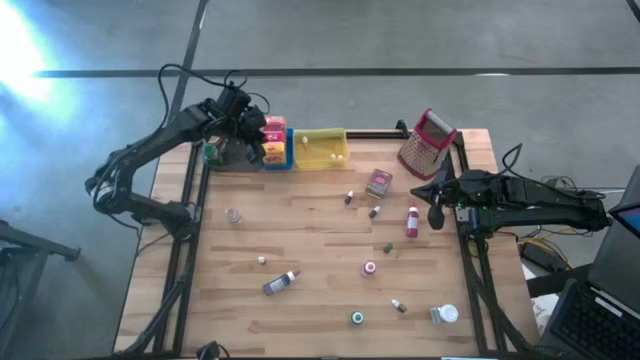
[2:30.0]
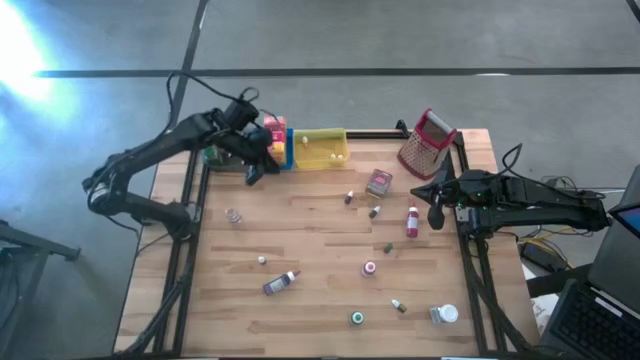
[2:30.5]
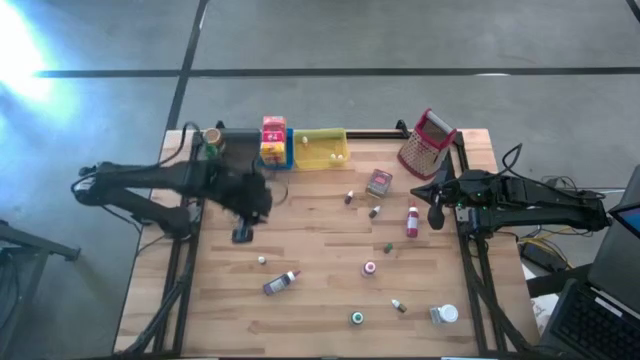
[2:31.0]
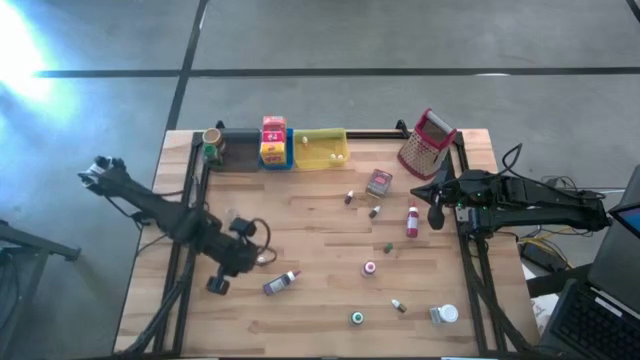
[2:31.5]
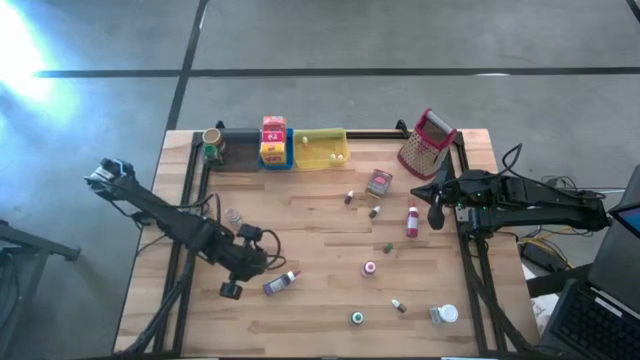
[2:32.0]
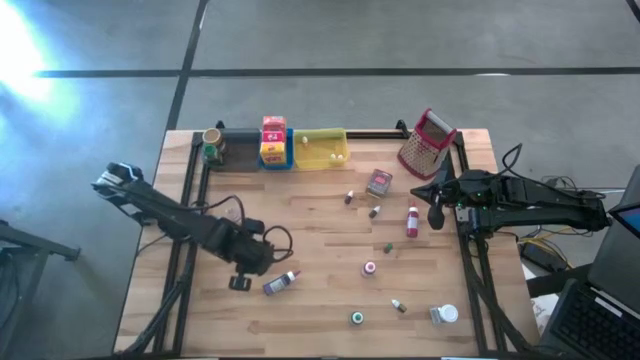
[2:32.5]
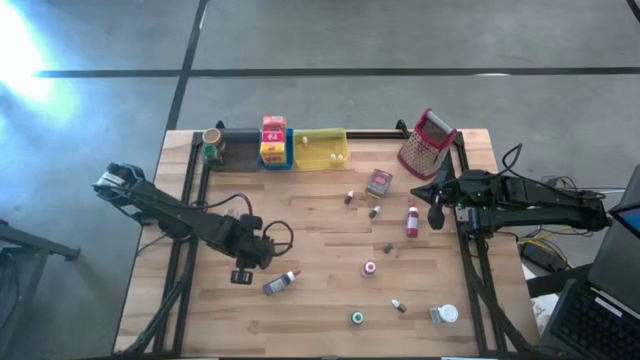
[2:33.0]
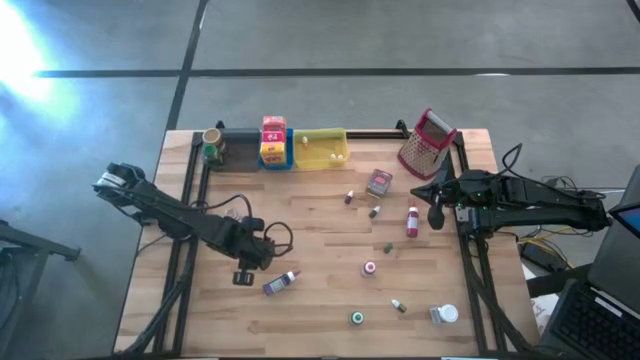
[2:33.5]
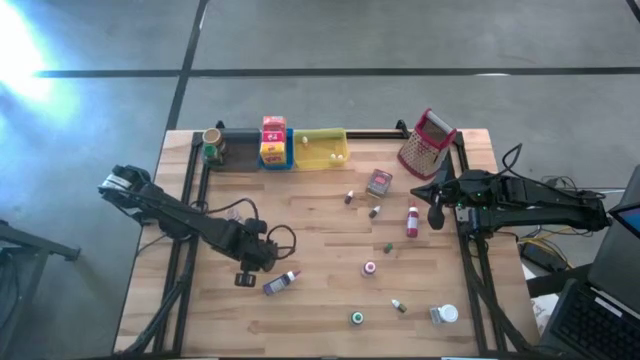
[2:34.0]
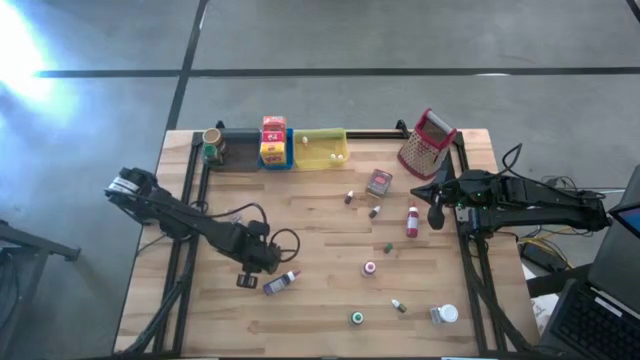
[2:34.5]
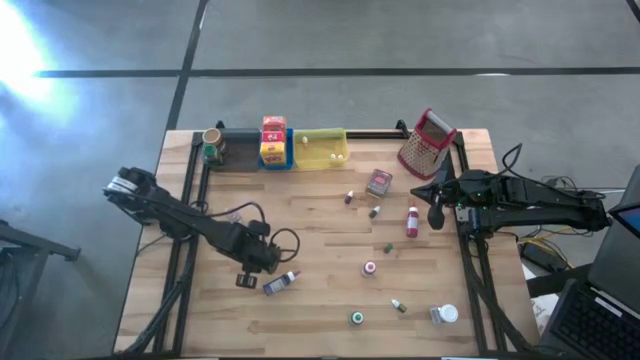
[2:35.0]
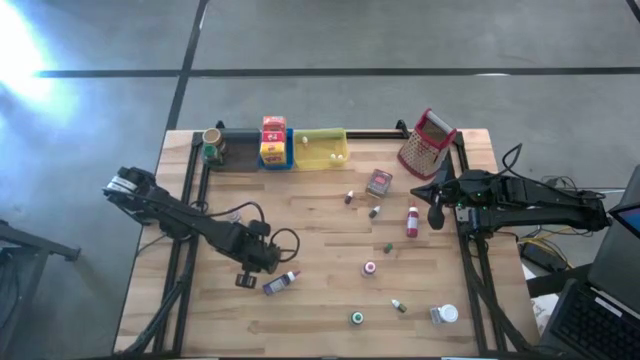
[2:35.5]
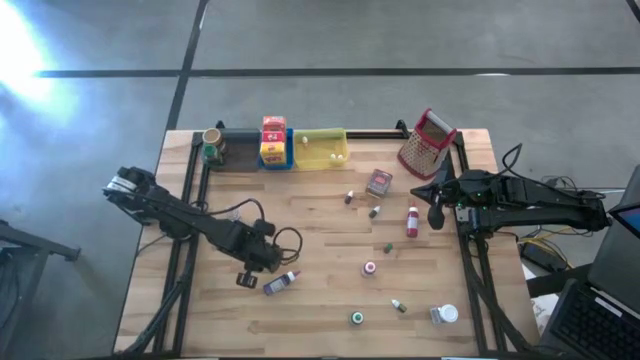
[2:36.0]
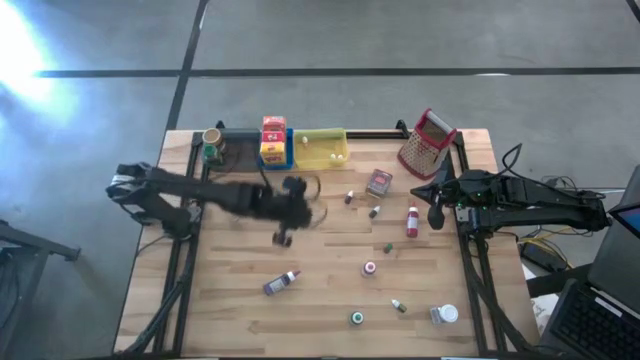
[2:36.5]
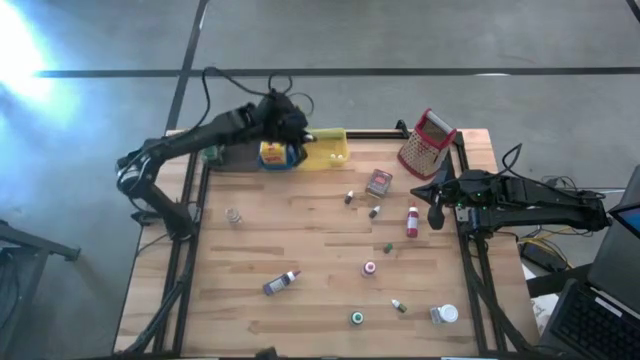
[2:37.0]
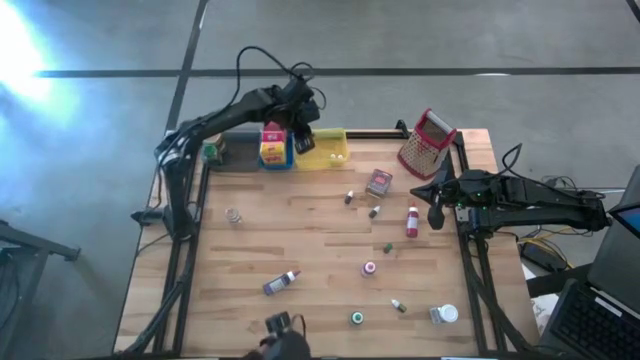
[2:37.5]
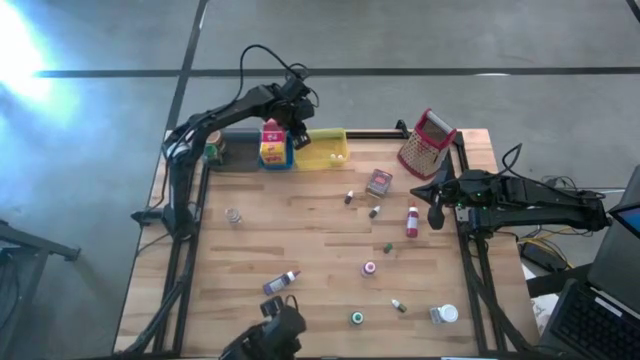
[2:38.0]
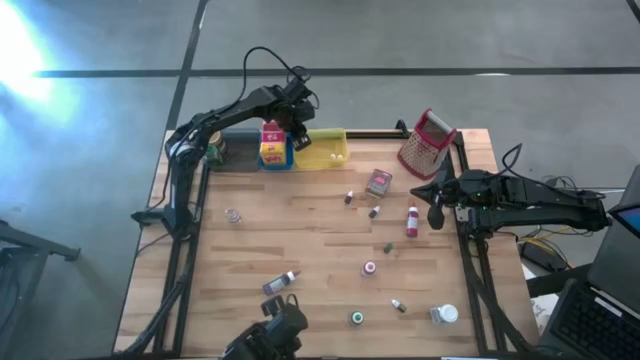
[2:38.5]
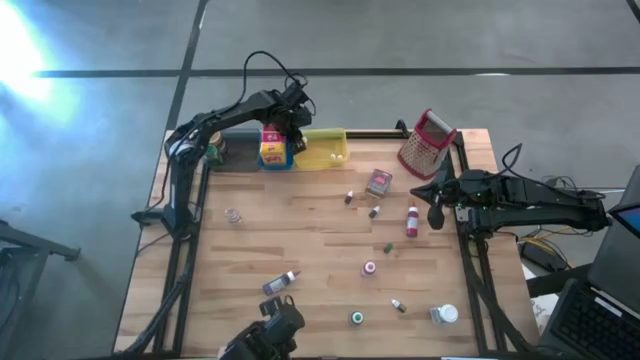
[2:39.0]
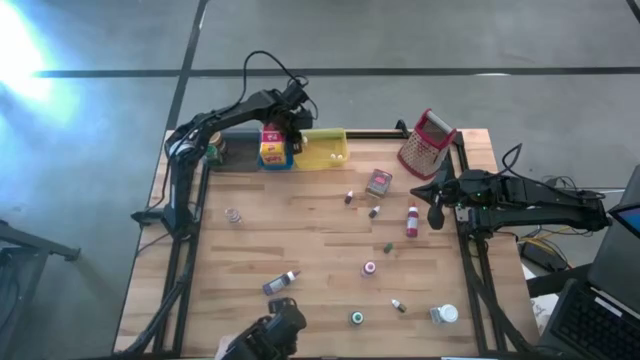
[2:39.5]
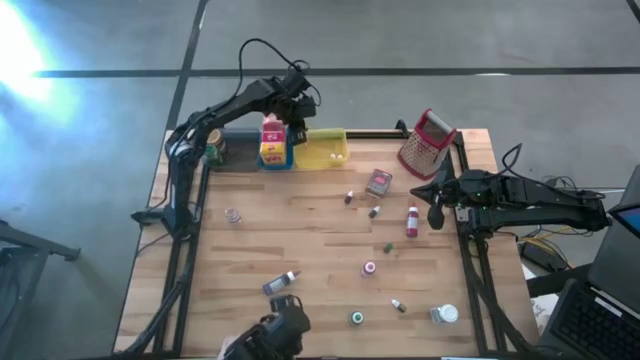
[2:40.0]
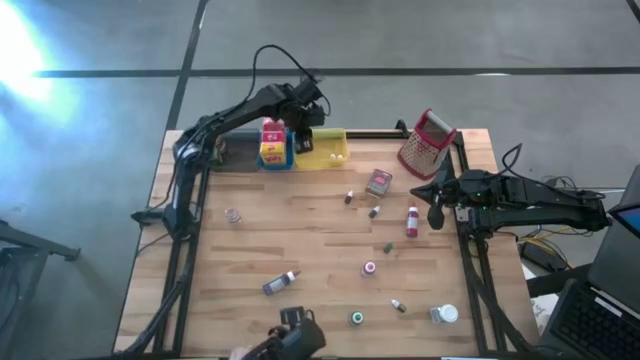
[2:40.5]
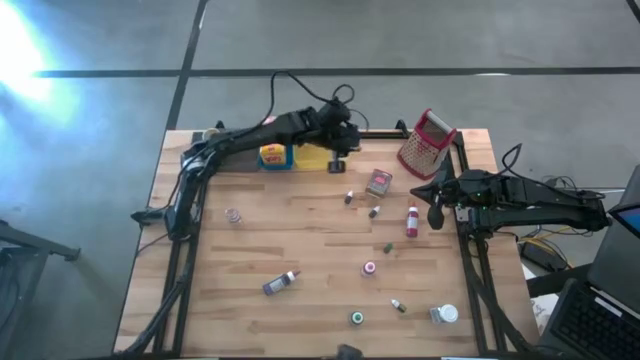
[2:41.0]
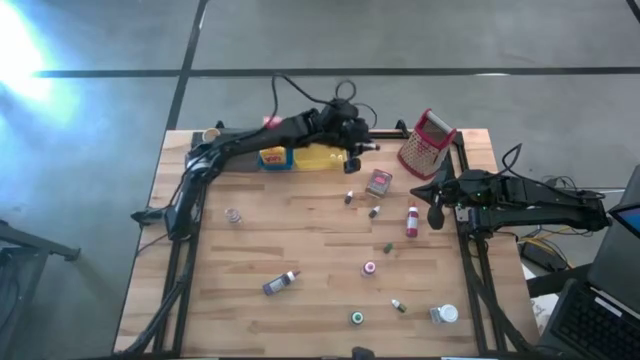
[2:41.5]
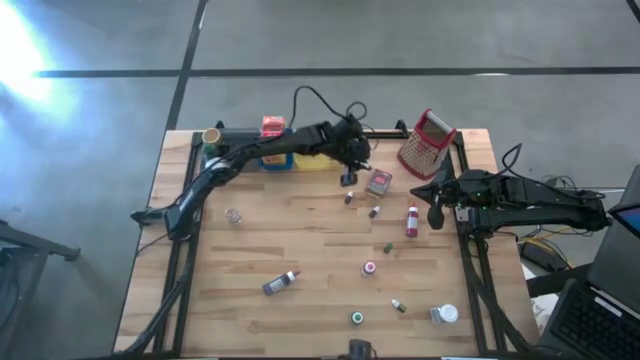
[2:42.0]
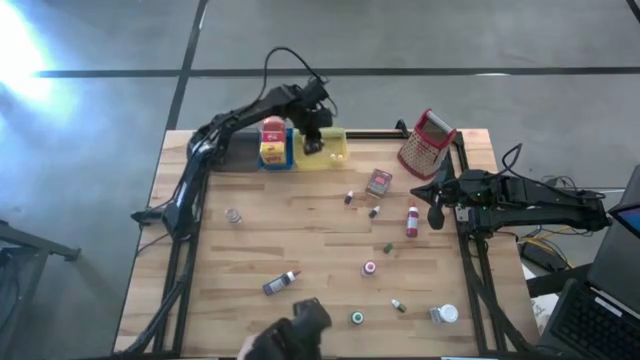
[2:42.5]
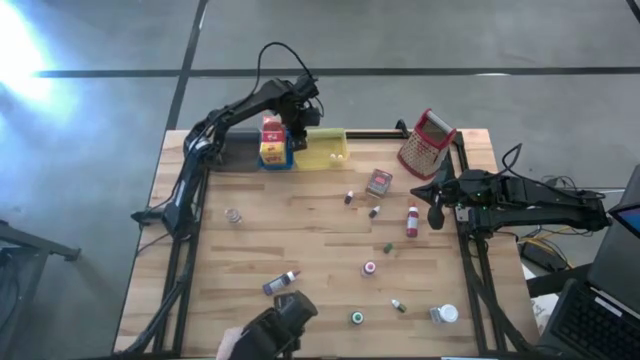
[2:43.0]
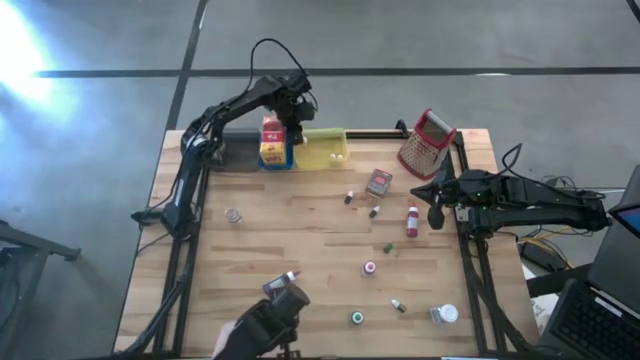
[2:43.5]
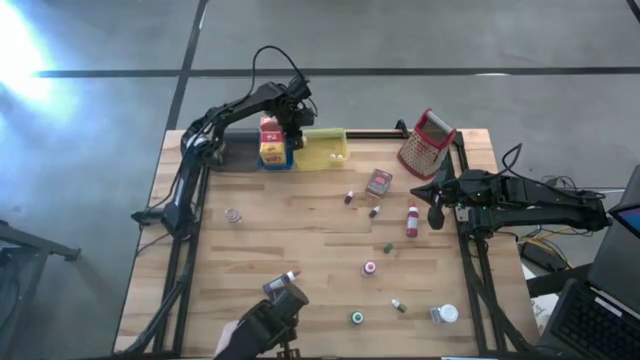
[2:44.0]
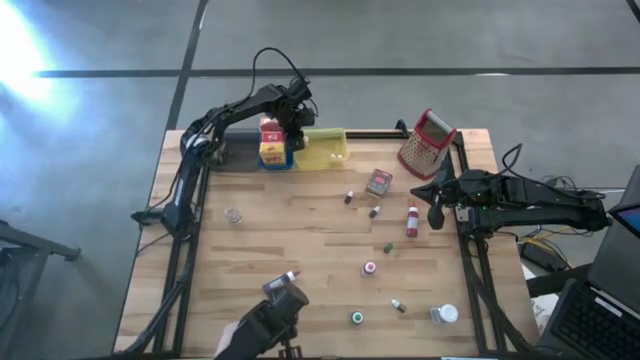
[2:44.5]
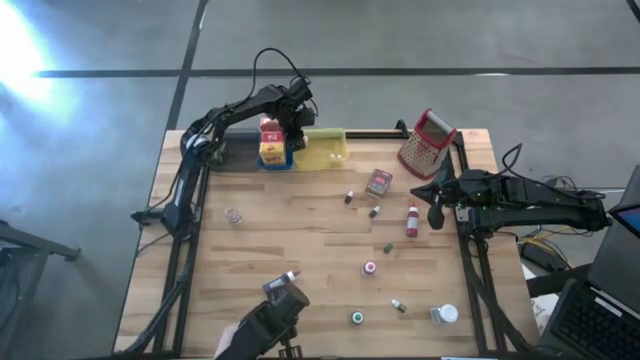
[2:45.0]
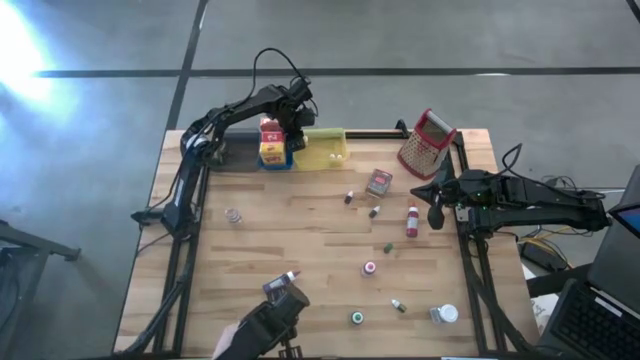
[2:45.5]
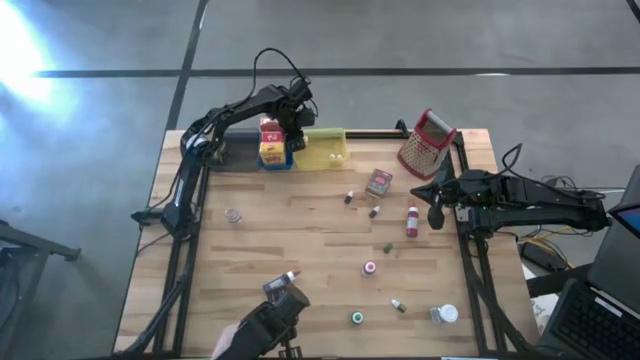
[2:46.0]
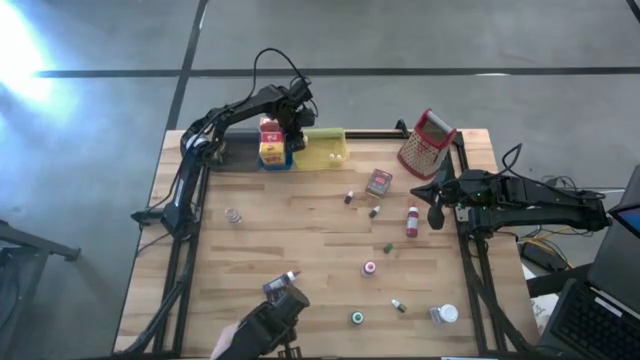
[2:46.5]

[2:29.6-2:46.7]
Task: Pick & Place Kitchen Items
Put the left small violet food coloring bottle into the yellow bin

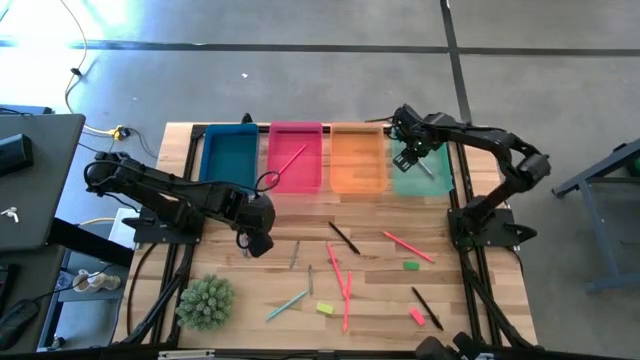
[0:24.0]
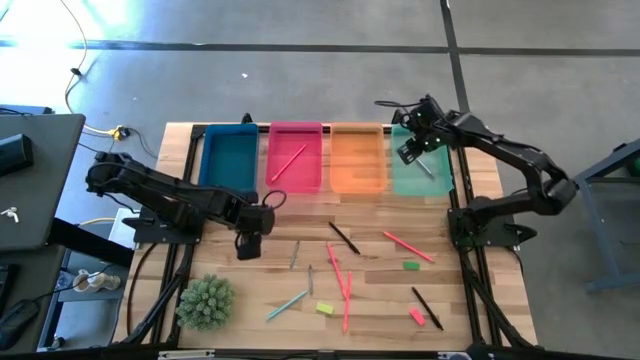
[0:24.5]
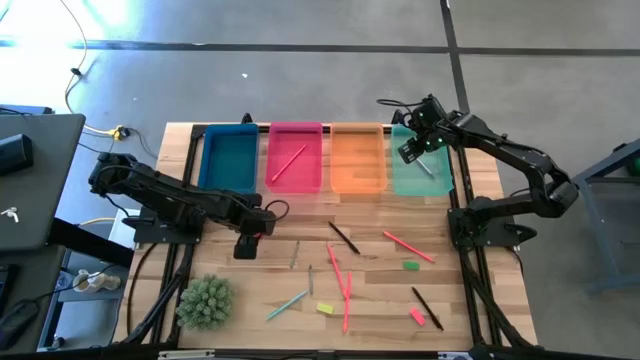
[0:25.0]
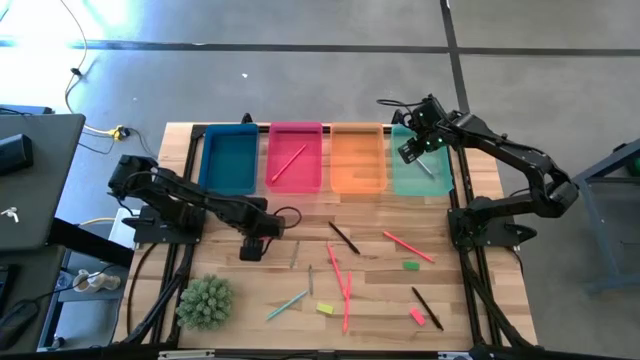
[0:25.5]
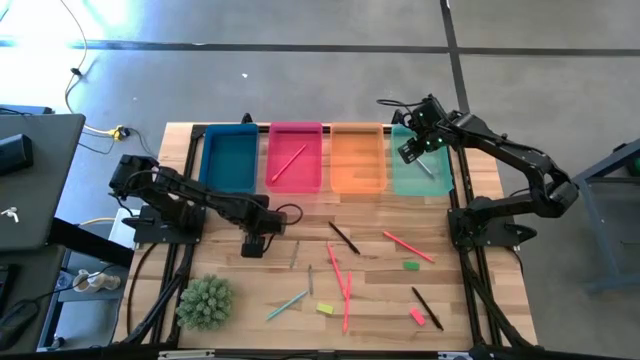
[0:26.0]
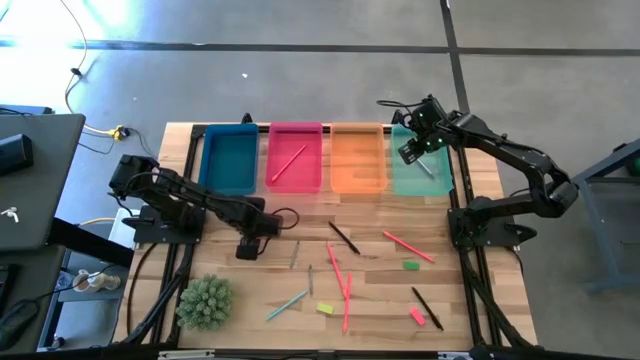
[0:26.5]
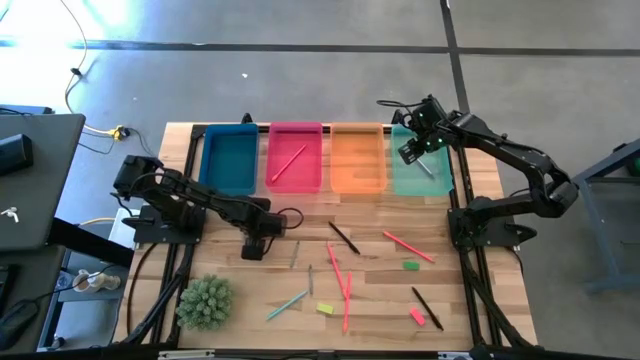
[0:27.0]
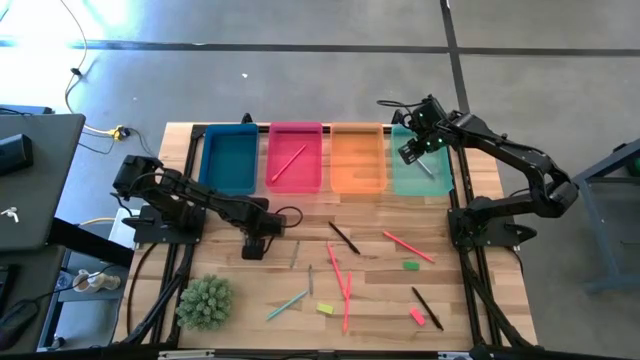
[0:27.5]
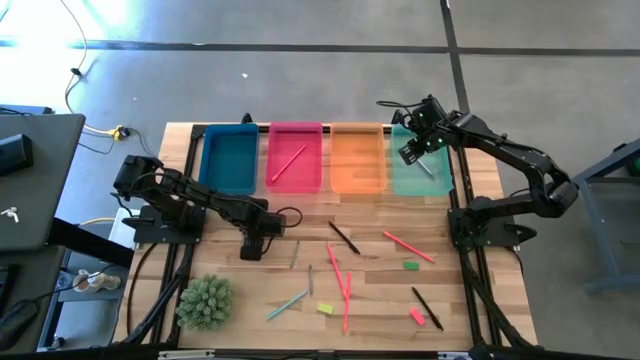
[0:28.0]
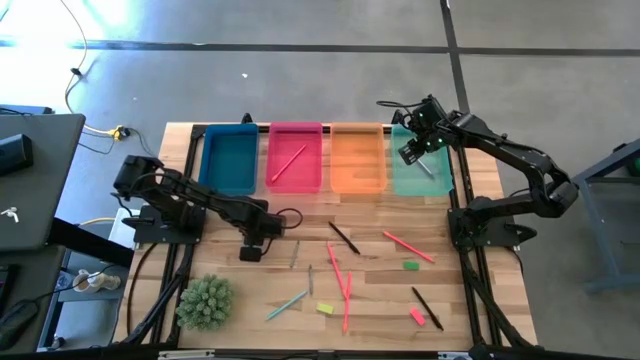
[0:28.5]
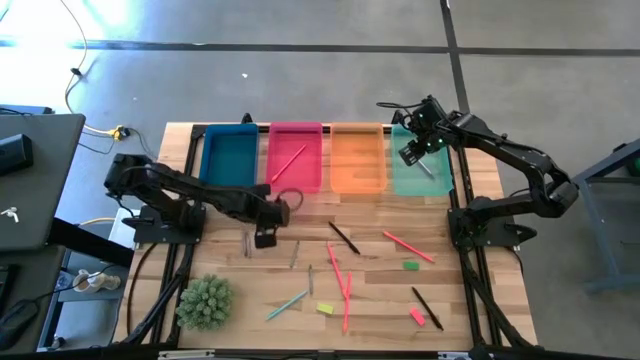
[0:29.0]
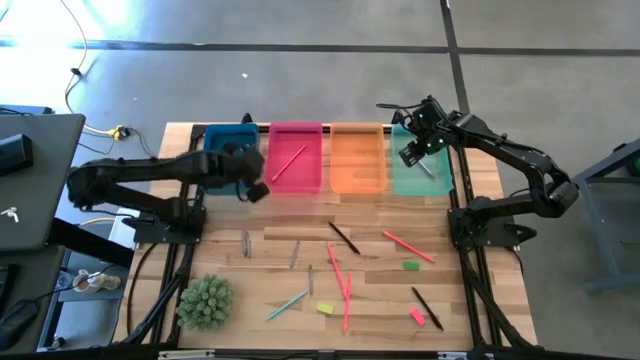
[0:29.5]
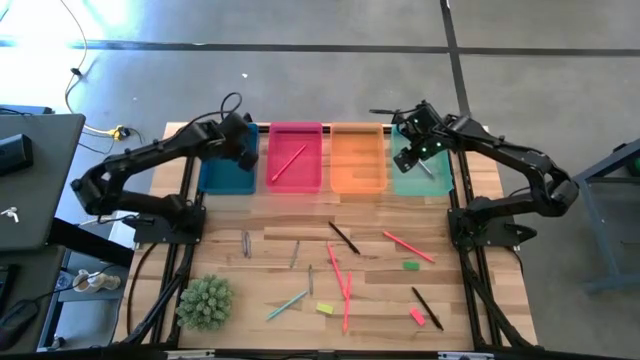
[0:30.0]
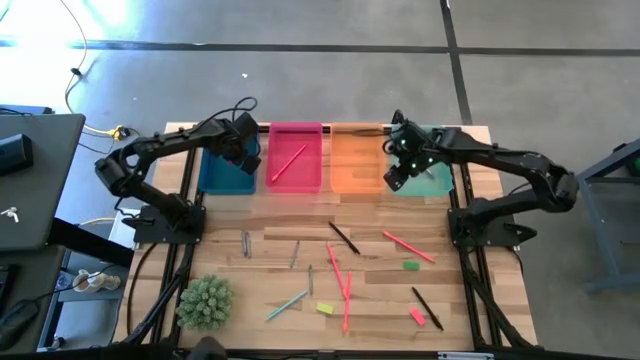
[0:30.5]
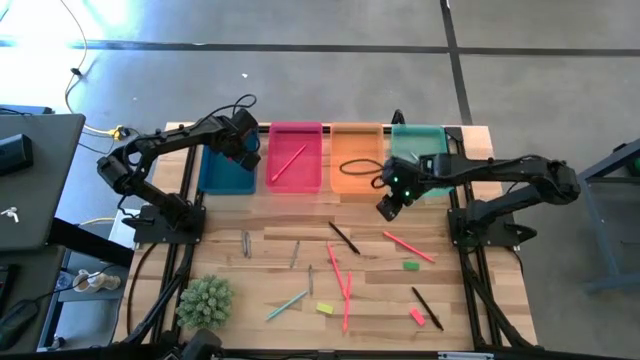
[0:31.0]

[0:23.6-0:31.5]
Task: Sort crayons/erasers/pens/pencils in bins
Put the red eraser into the blue bin
